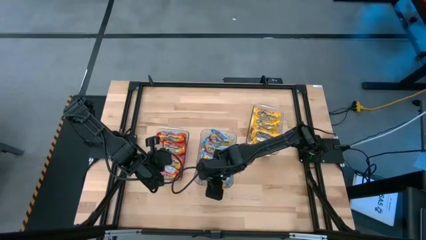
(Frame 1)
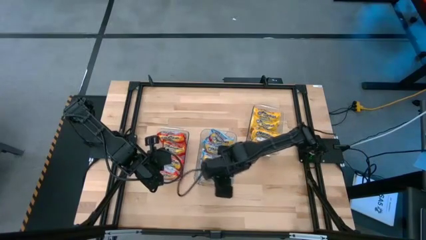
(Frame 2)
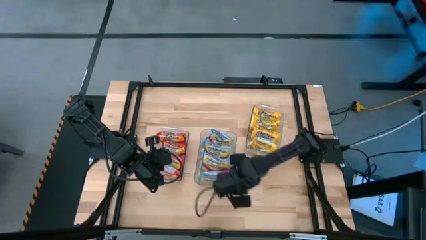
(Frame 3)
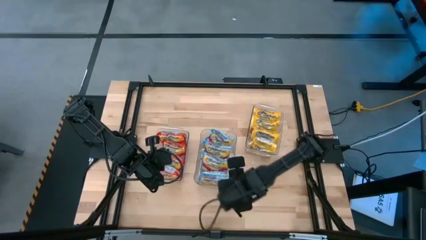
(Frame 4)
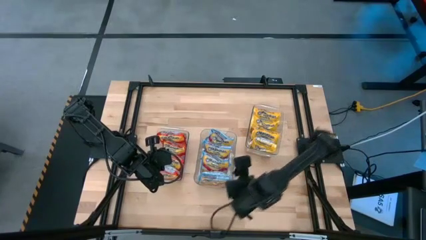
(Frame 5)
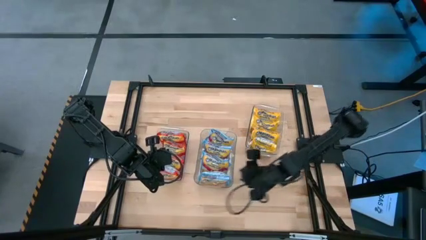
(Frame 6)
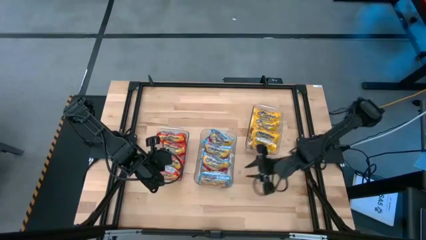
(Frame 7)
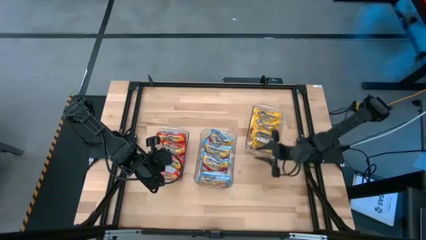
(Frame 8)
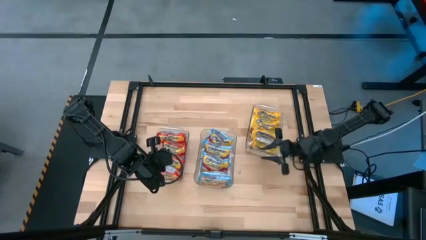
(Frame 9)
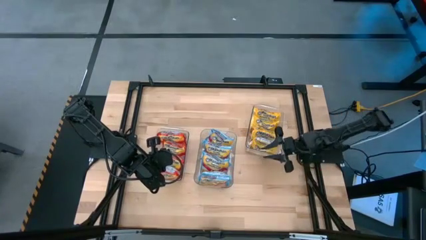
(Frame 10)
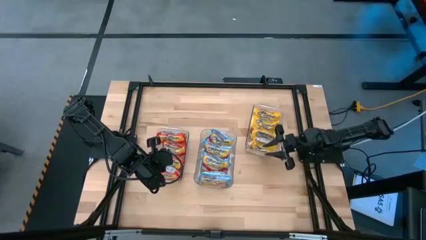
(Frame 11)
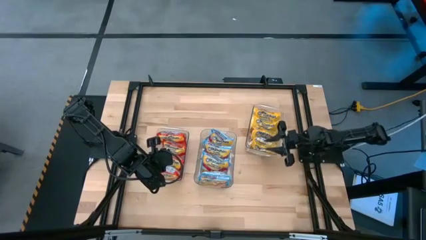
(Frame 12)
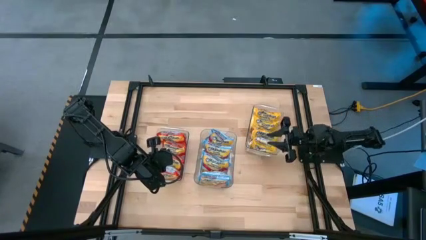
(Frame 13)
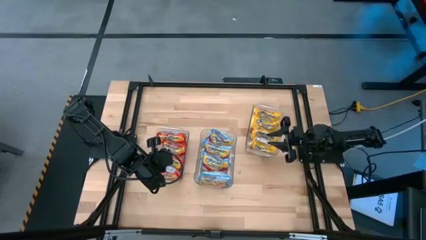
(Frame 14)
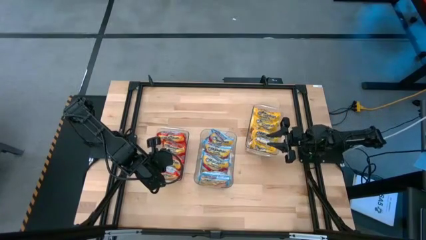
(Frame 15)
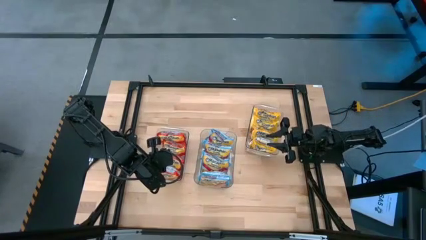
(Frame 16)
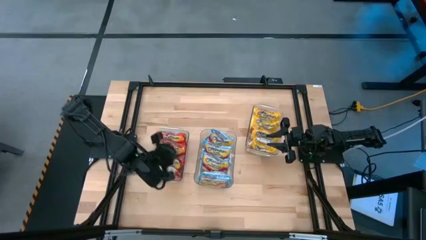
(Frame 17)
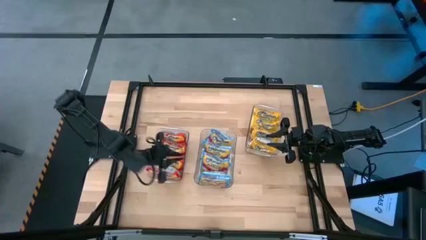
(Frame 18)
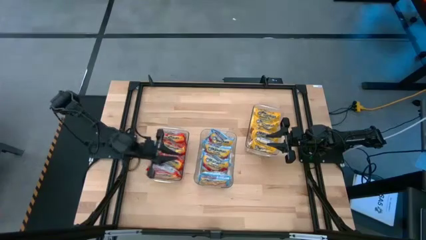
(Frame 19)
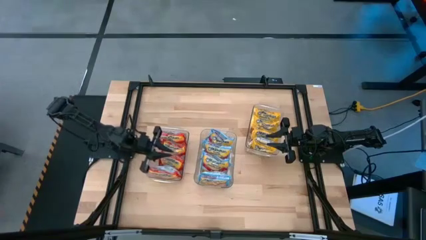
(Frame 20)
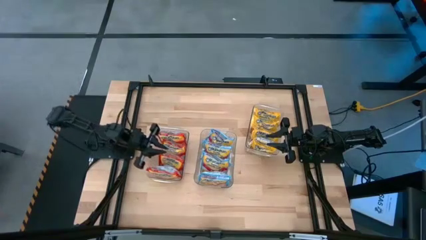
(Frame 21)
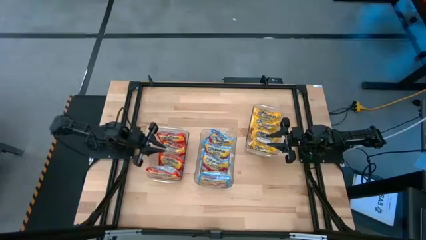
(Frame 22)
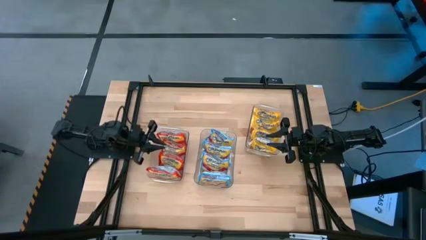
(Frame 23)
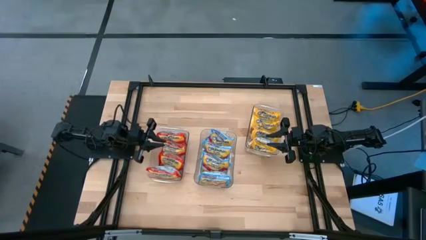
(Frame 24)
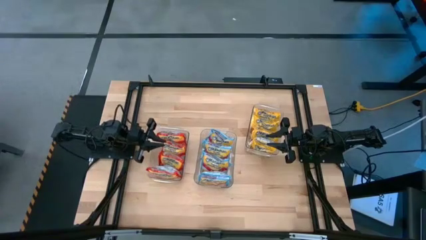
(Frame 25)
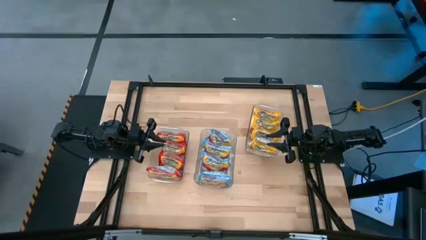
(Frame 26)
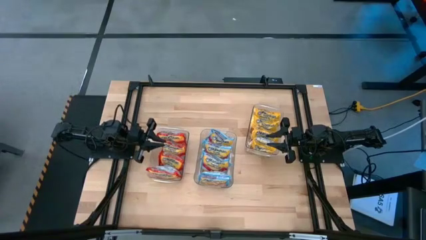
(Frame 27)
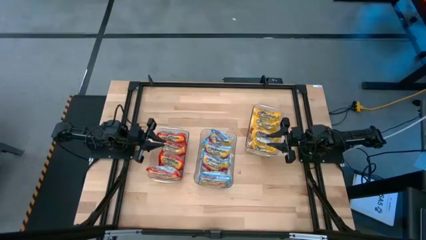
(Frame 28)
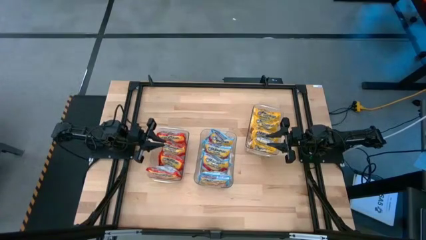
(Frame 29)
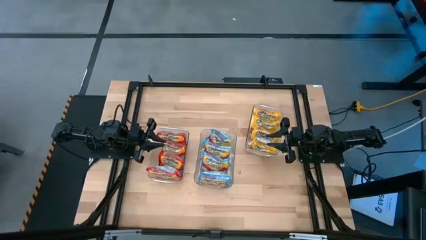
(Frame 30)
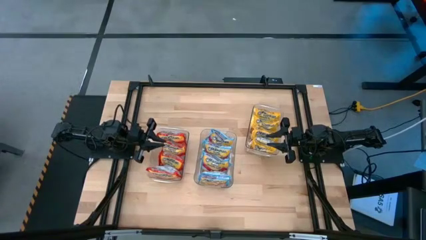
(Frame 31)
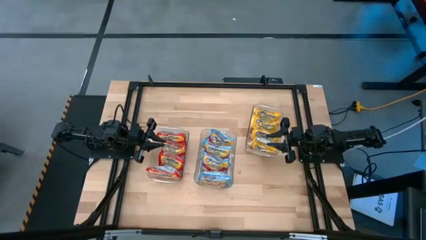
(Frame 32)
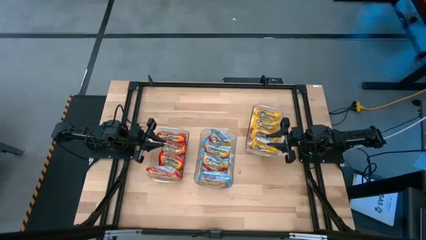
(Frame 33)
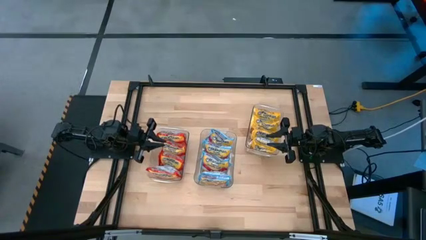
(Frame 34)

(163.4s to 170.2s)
Task: Sort Maruchan noodles
Return to Home Position

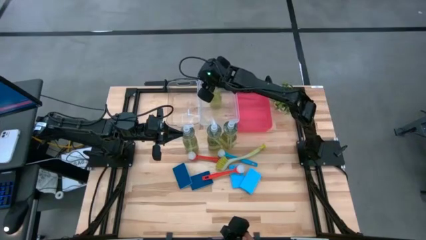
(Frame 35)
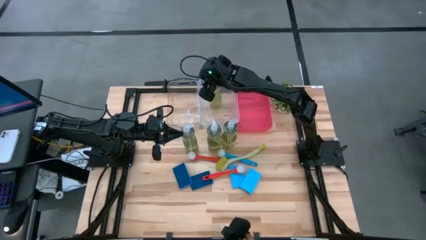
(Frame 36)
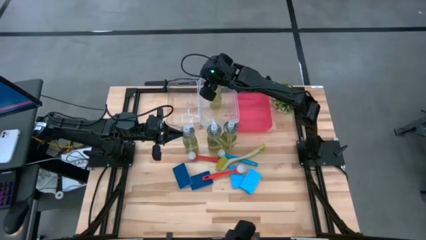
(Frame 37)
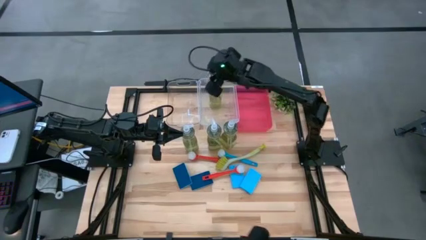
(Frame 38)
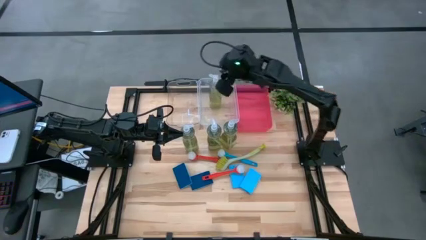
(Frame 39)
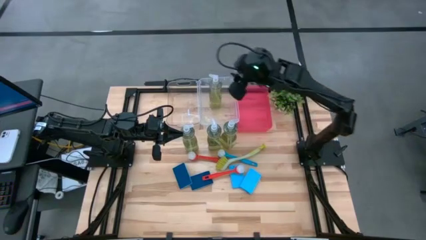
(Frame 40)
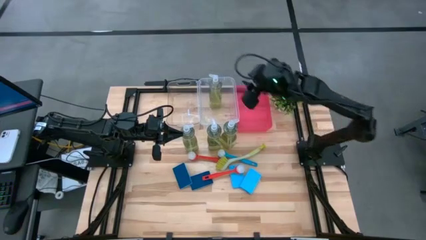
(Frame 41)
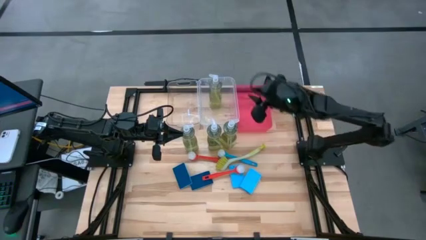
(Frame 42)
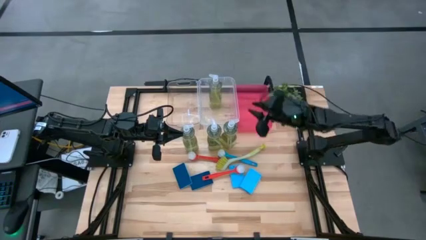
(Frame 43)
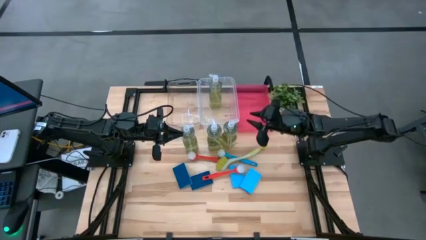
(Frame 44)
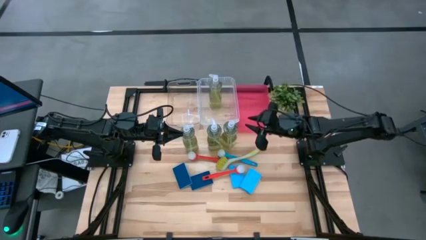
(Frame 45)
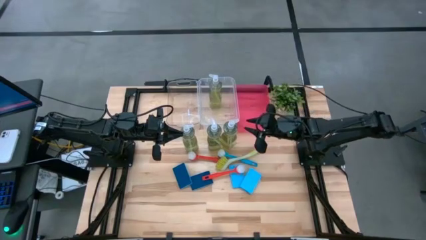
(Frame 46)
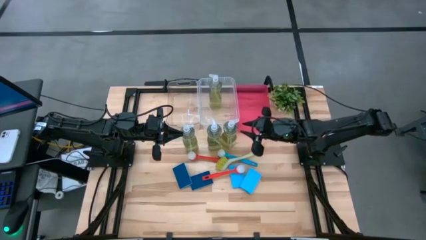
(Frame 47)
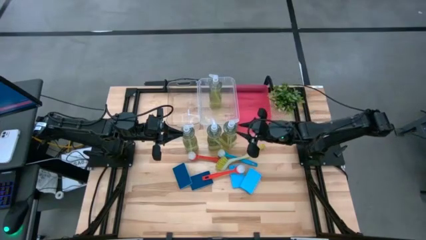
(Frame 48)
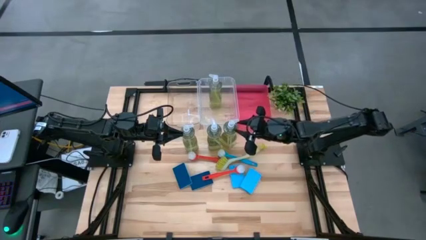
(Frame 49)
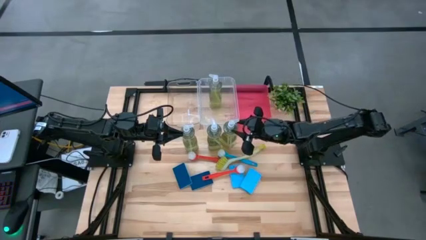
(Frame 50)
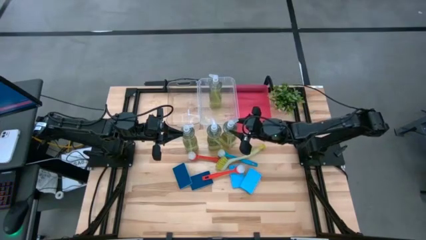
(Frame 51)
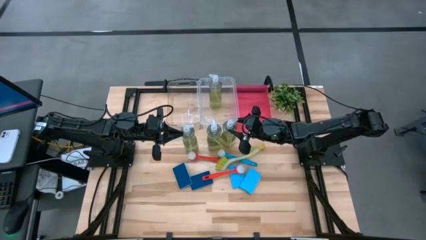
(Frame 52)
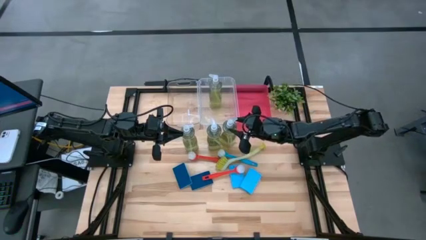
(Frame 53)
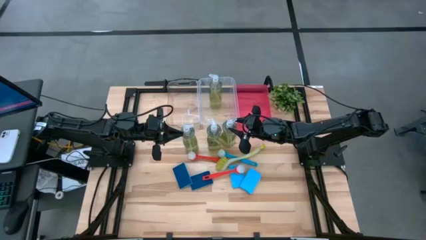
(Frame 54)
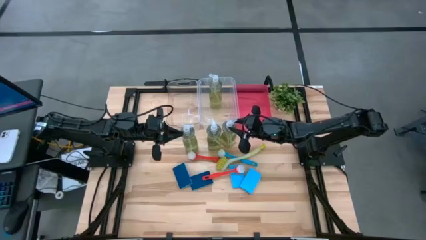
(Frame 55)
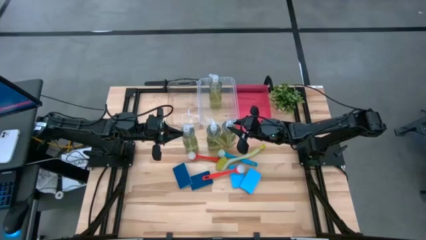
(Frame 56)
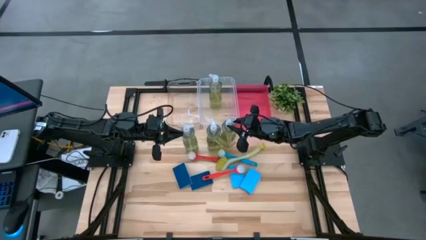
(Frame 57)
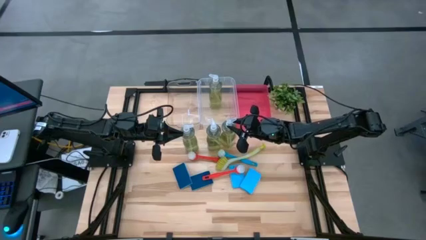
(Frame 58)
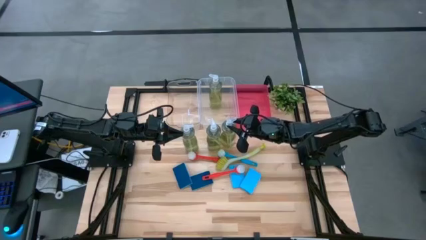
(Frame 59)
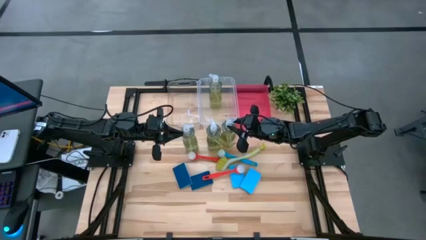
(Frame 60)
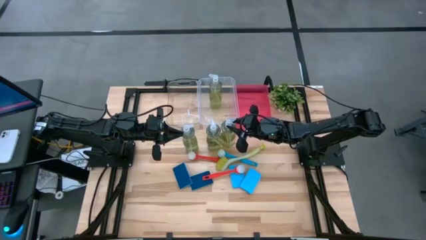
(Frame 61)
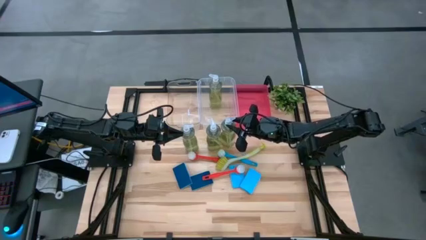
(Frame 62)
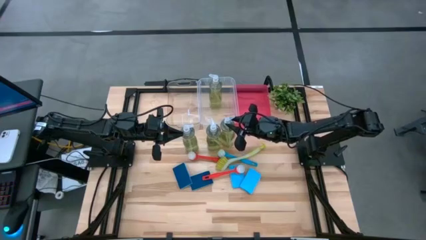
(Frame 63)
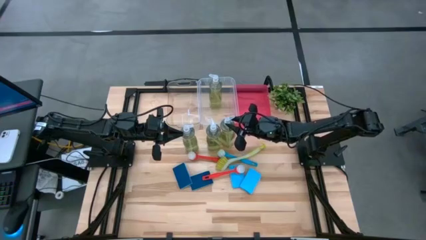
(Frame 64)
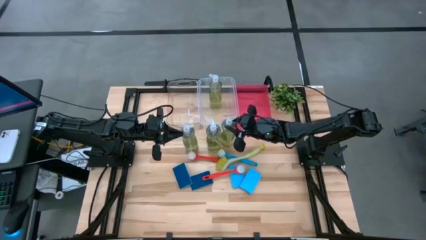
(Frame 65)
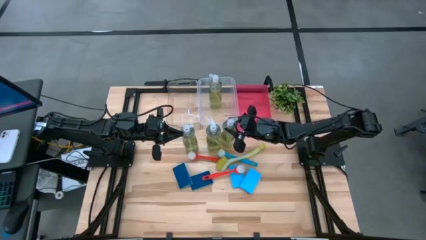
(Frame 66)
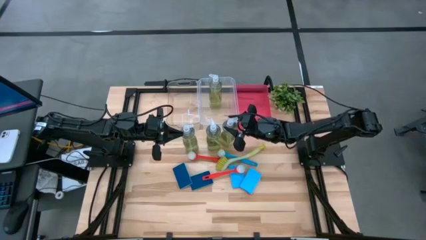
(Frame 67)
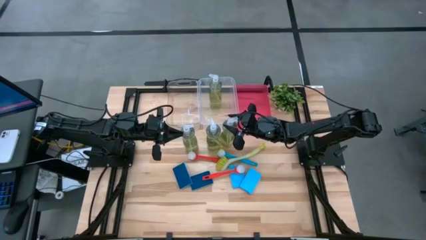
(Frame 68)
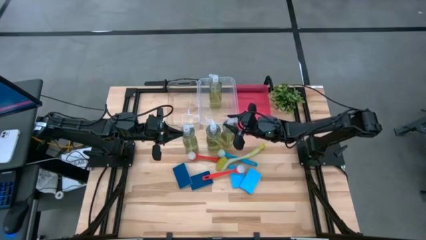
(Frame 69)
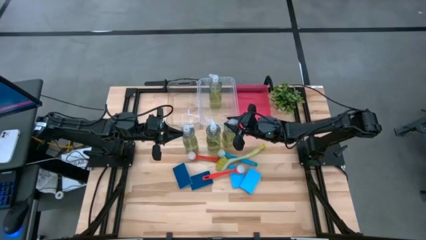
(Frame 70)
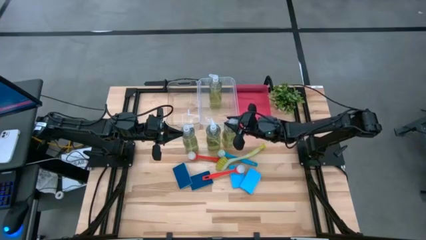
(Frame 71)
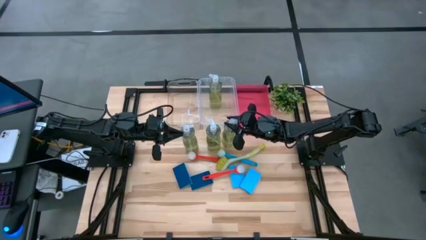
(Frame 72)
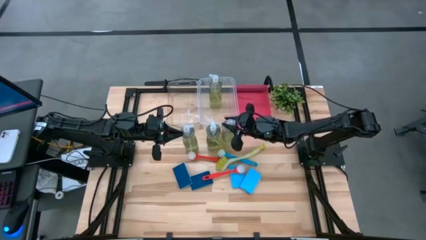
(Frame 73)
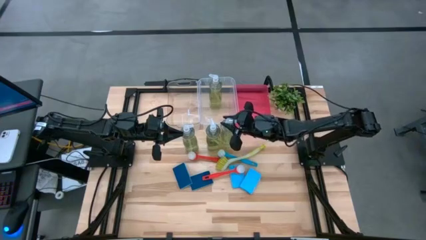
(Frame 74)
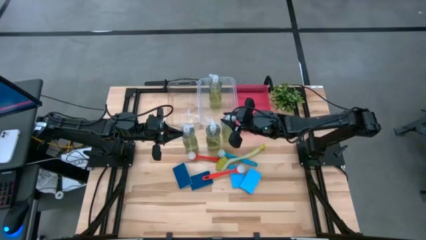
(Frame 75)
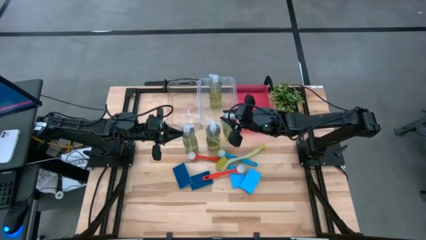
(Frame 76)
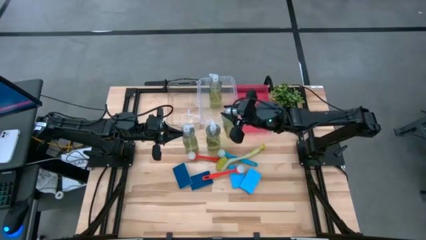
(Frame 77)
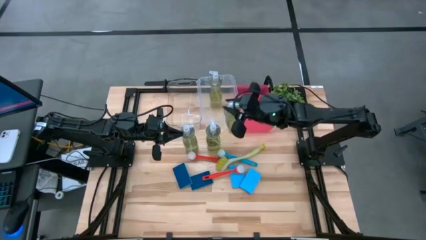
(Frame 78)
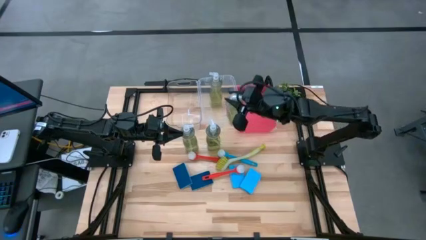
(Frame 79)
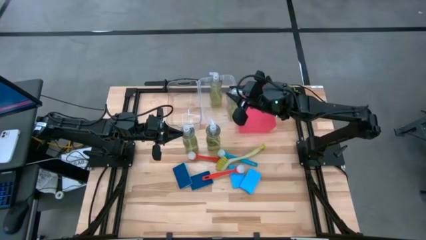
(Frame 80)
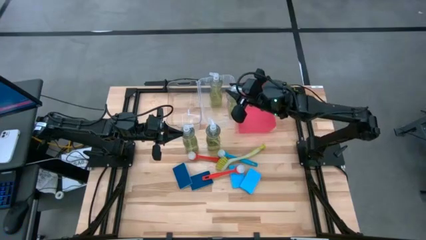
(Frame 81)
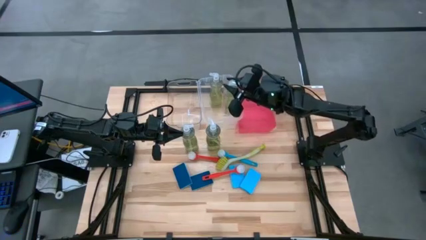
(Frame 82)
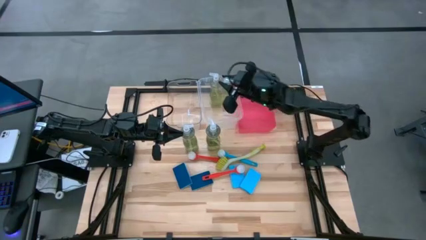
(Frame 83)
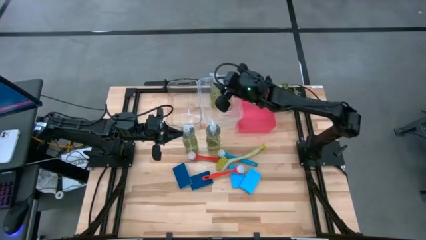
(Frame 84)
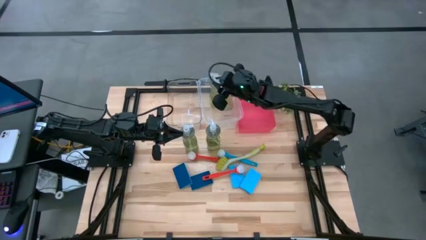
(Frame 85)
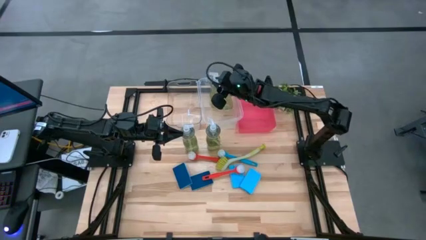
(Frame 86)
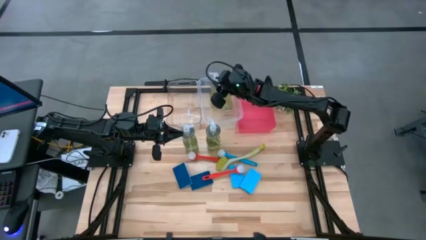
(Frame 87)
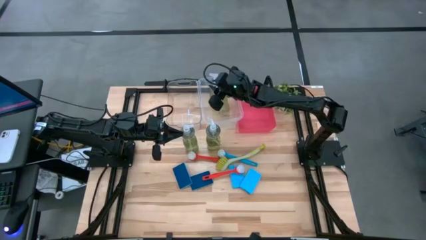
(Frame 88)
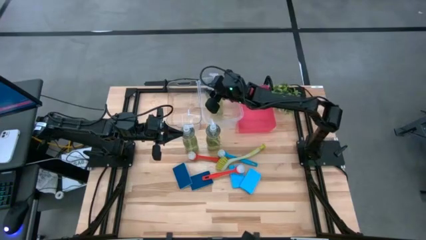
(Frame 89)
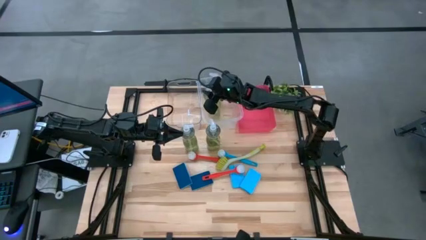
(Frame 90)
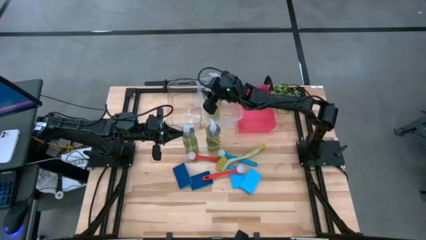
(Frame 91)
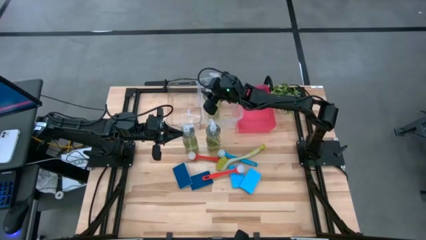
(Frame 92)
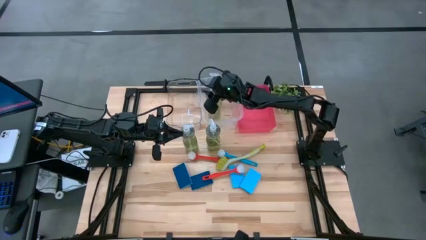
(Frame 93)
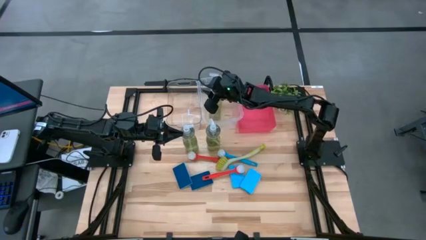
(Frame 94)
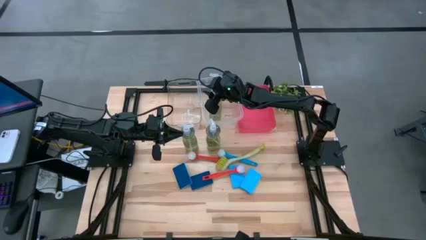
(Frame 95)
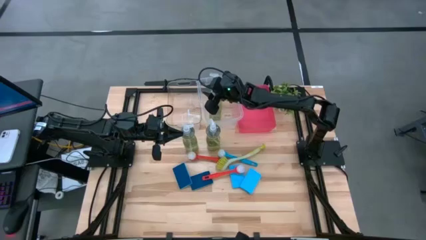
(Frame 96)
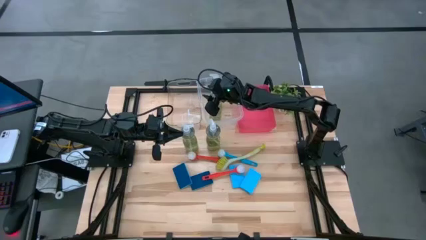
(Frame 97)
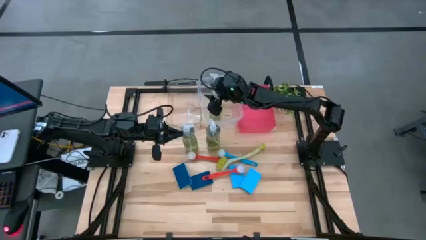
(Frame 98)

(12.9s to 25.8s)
Task: Pick & Place Kitchen Sink Supplies
Put the yellow soap dispenser into the right transparent bin
